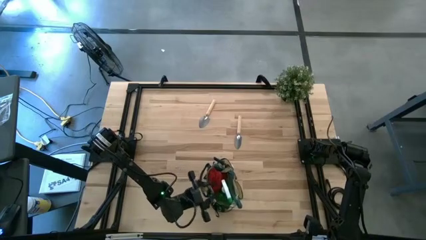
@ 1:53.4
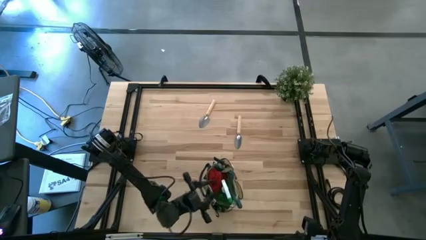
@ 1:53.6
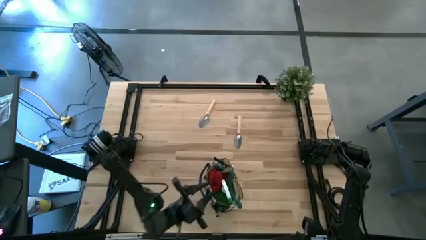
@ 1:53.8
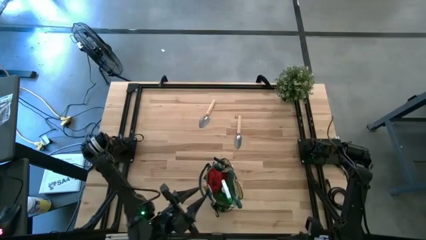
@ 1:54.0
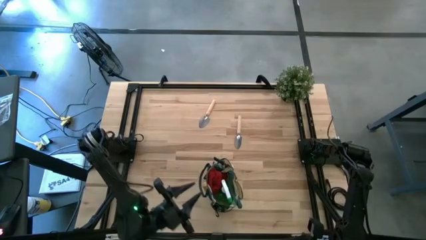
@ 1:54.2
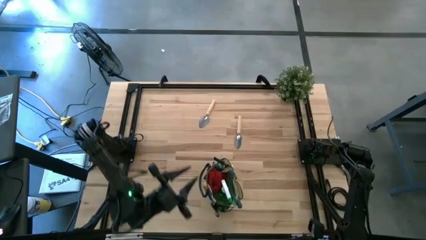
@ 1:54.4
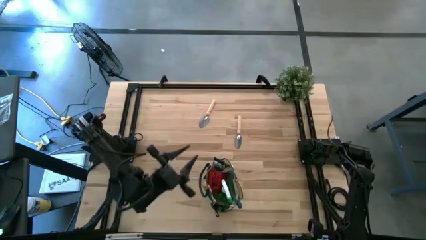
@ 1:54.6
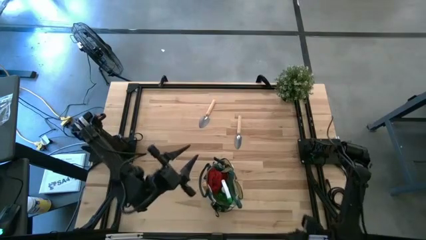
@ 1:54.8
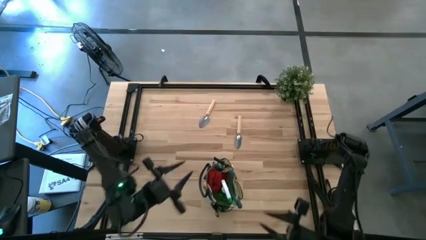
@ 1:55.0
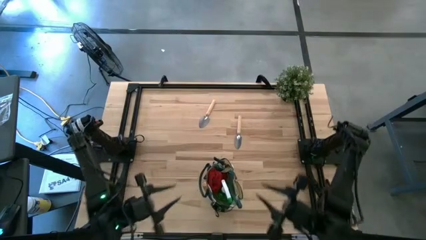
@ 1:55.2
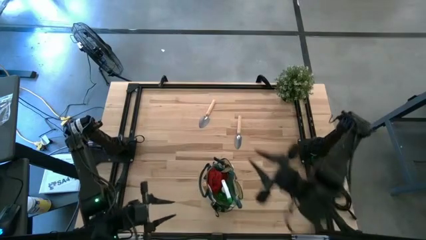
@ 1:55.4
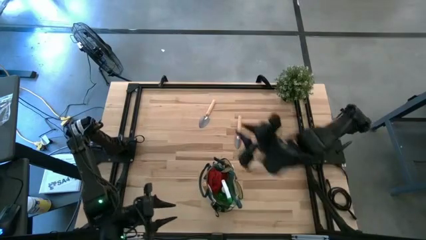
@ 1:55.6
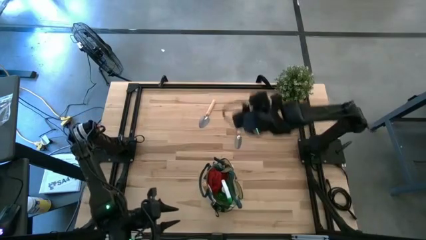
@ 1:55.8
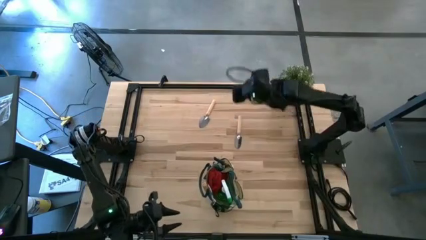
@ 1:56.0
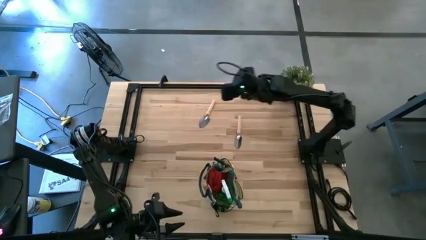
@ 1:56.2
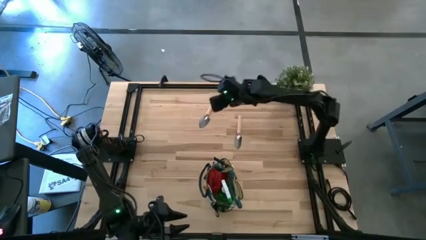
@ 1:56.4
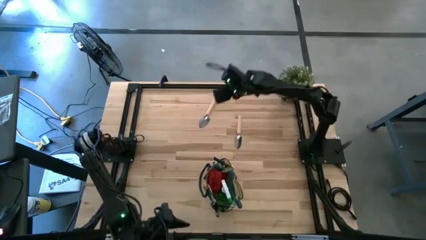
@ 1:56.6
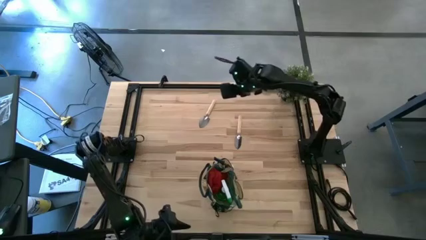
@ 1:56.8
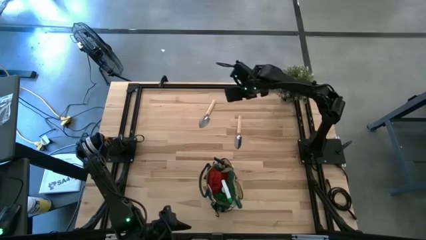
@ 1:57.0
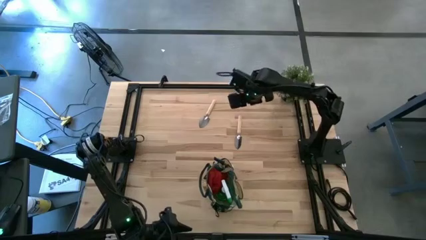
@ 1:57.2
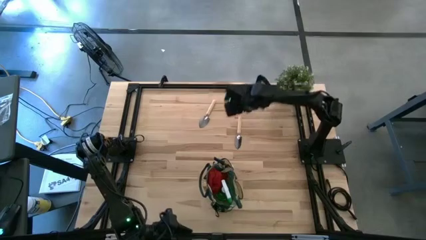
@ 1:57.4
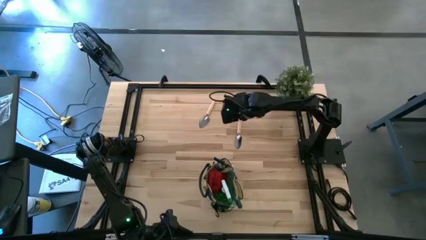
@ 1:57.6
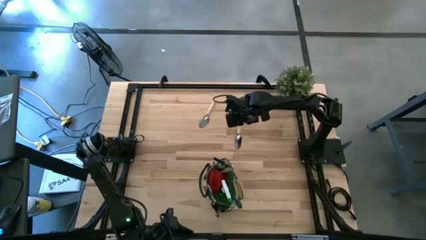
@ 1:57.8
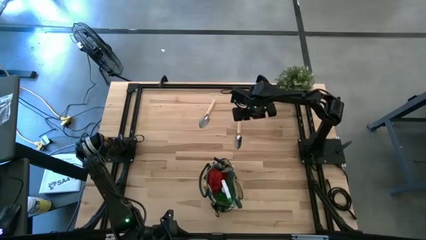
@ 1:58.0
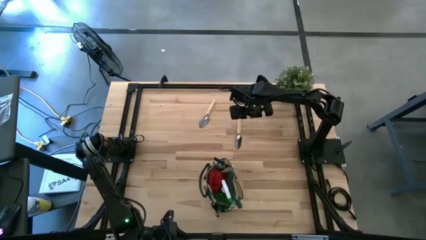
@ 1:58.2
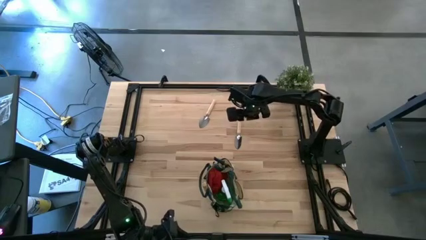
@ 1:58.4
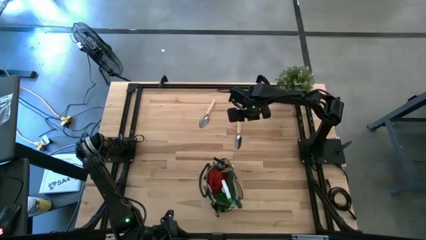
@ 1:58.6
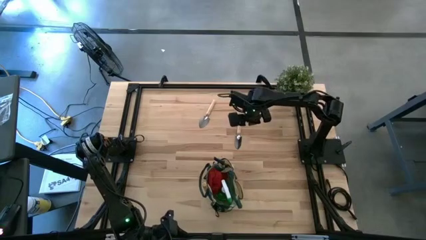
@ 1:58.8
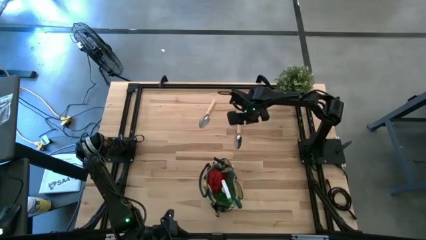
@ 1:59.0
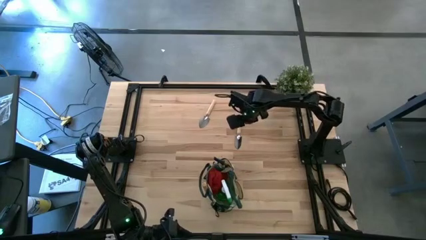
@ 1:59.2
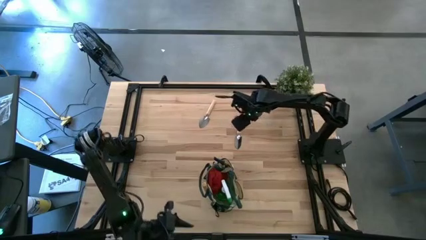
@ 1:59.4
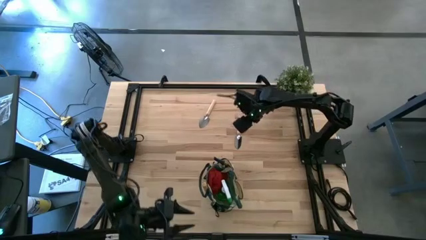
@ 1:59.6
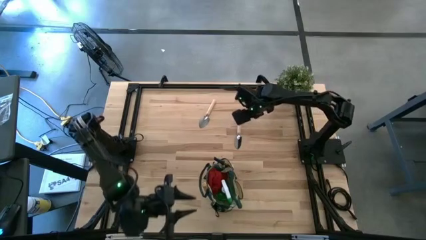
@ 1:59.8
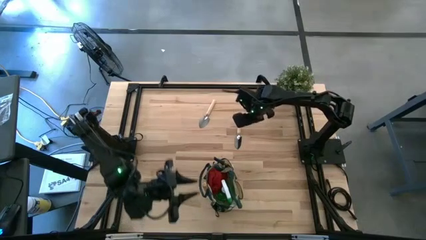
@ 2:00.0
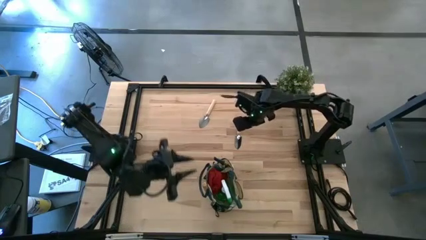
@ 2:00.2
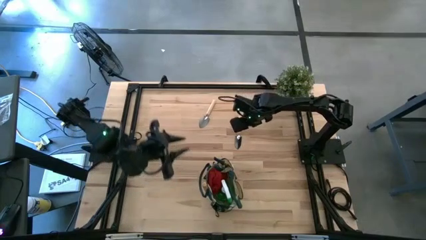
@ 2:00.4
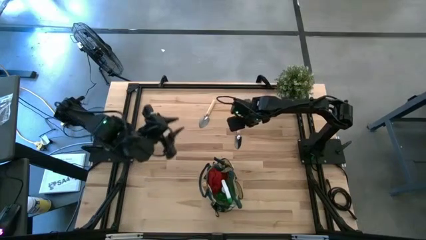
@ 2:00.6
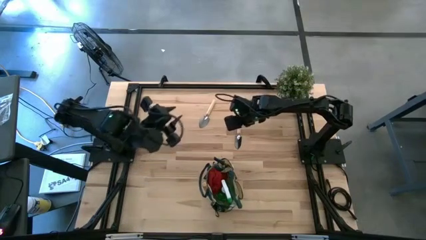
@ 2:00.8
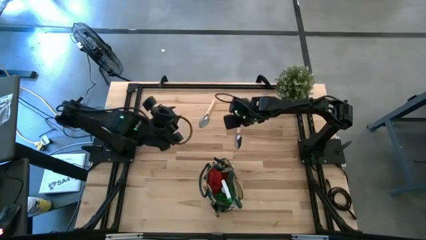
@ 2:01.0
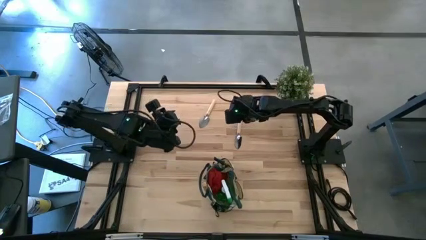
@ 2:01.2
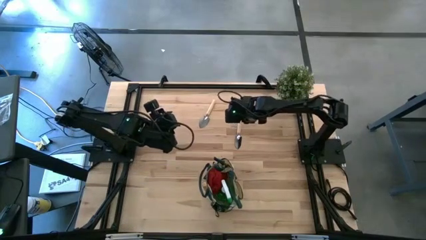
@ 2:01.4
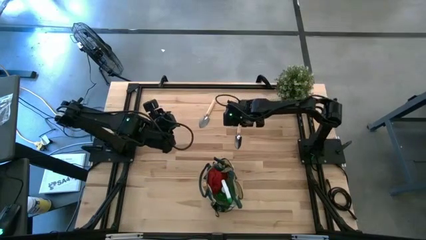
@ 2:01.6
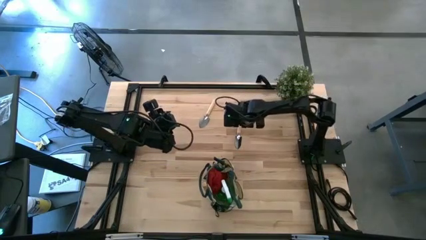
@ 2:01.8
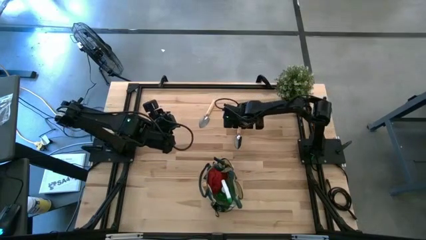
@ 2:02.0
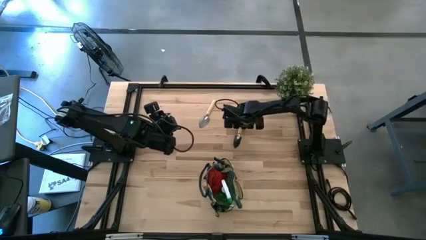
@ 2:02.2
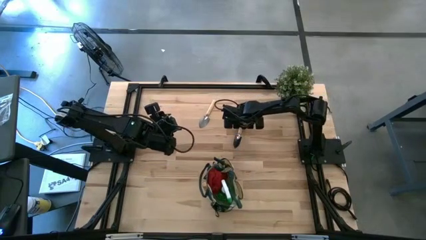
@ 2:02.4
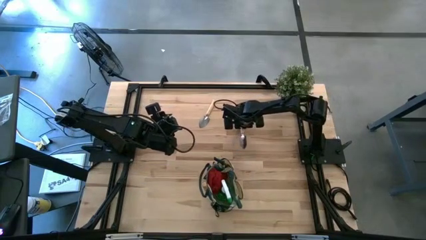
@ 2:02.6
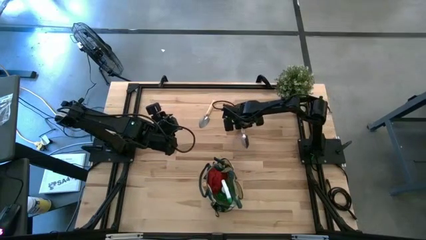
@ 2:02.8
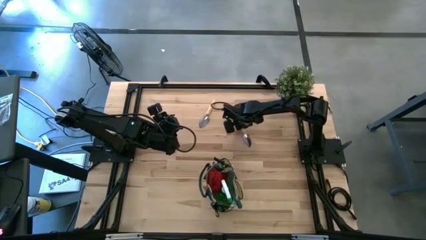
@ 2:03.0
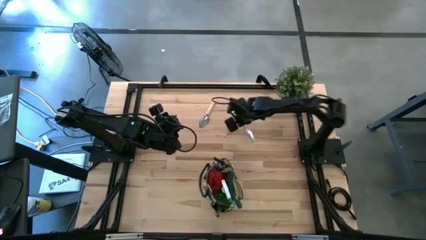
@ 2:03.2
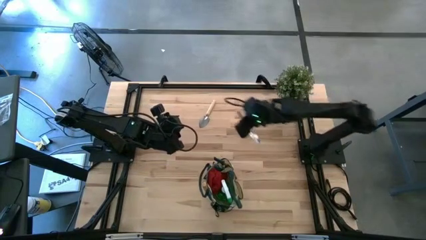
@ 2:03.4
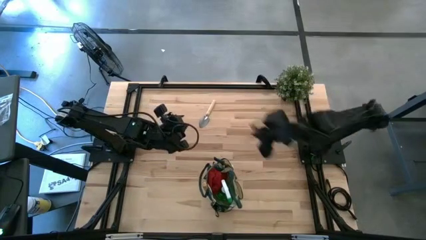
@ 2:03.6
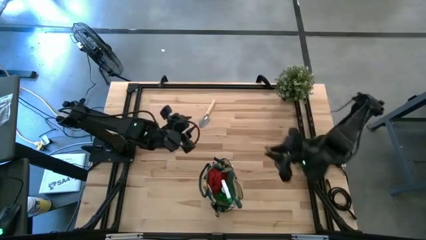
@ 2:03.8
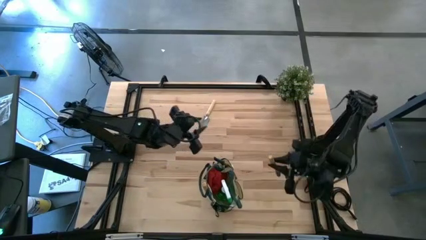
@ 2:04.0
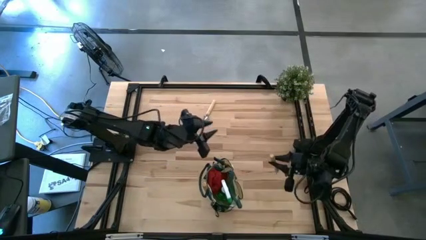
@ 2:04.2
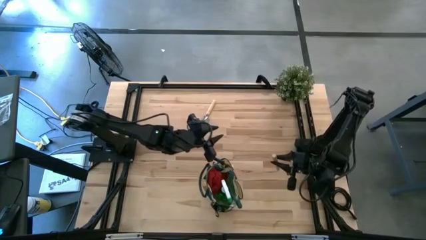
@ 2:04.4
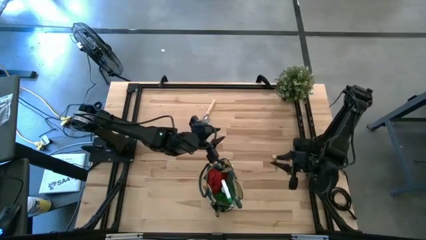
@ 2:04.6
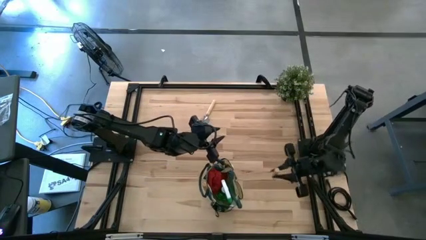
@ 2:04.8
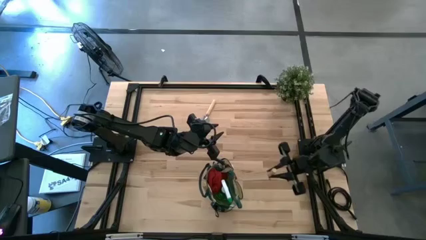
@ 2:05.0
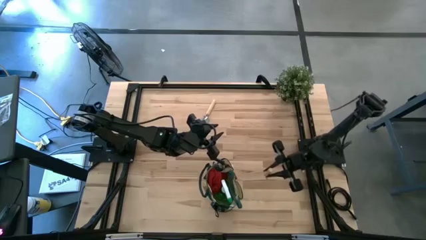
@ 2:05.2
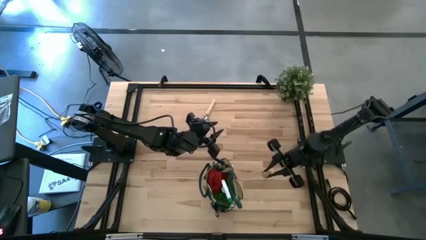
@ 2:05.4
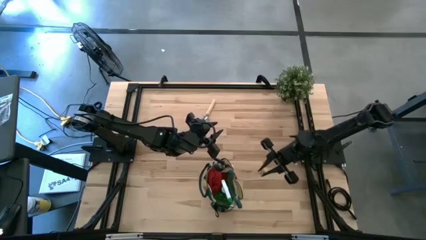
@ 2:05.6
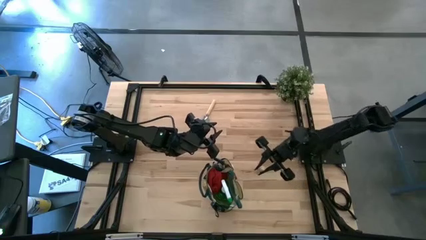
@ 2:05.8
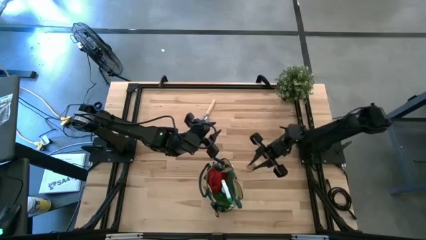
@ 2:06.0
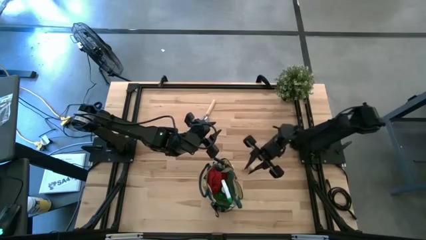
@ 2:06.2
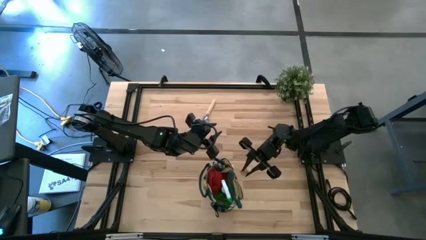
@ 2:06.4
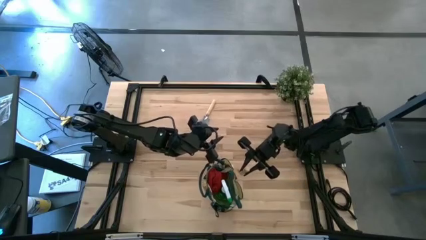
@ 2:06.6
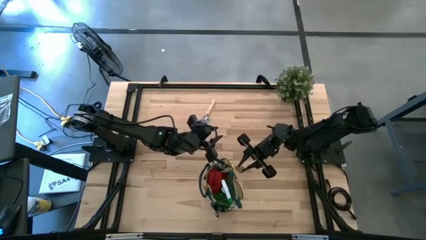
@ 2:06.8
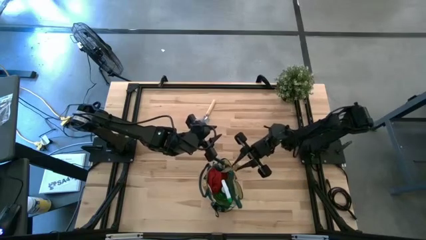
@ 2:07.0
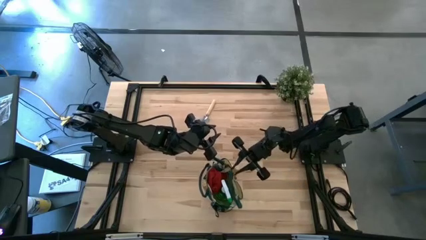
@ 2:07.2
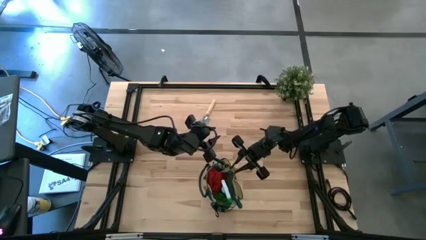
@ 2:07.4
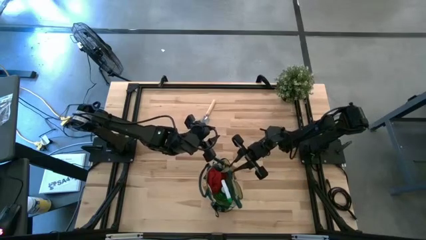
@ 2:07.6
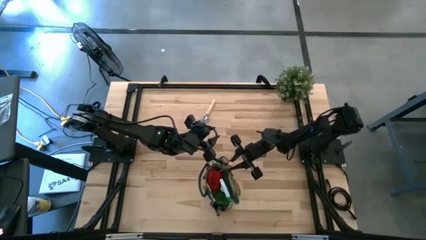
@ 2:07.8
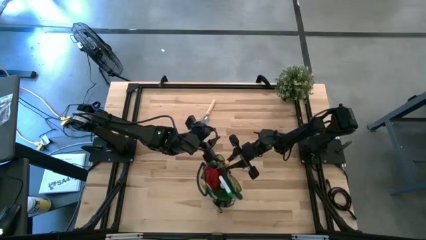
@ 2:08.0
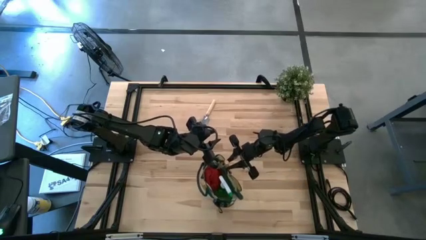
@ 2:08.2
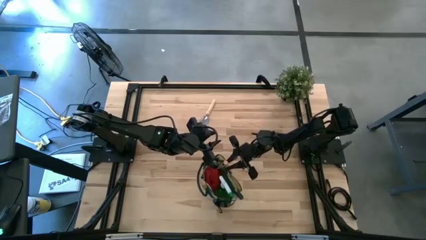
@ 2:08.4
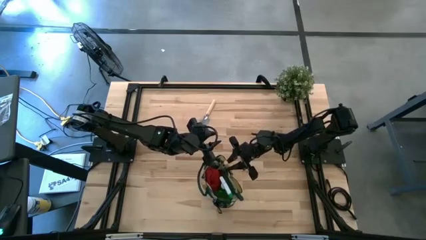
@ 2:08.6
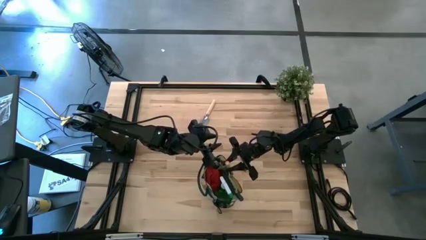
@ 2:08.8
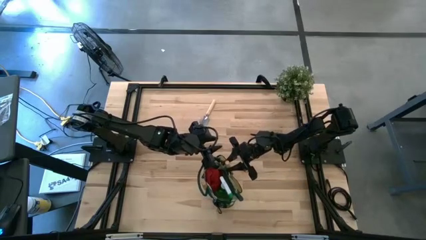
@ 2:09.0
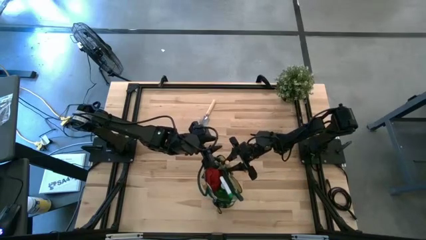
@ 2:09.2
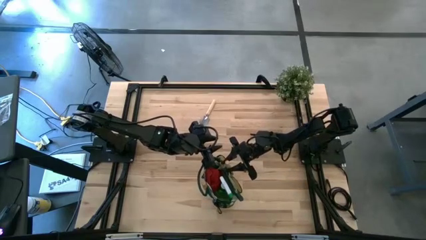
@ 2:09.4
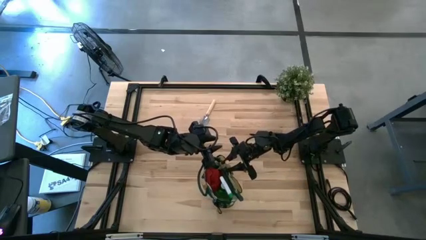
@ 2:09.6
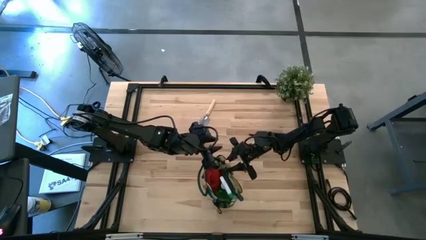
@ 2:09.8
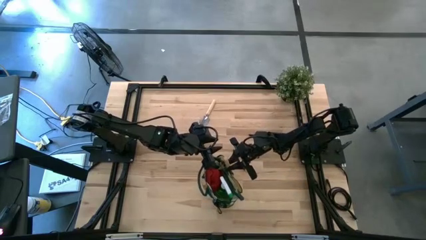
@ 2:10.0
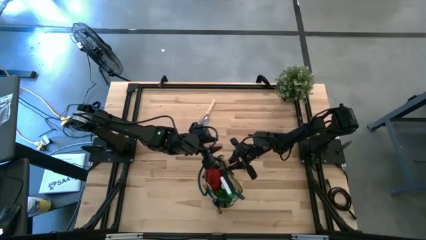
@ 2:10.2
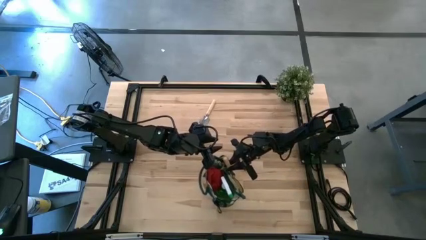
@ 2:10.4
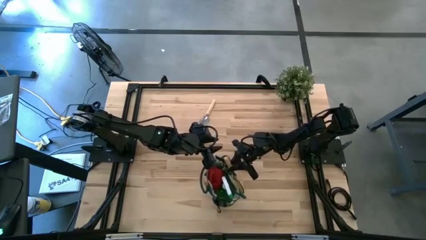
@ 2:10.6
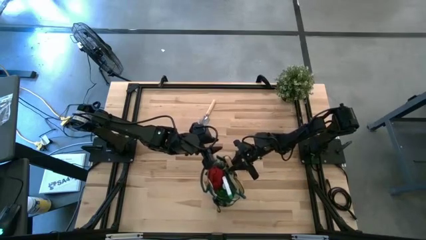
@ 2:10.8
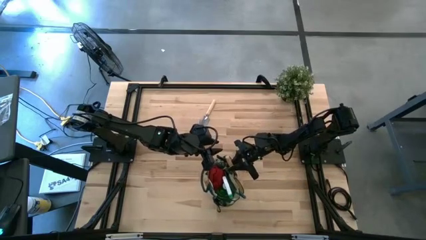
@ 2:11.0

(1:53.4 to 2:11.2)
Task: Pick & Place Garden tools in Gardening bag
Put the right trowel into the gardening bag
